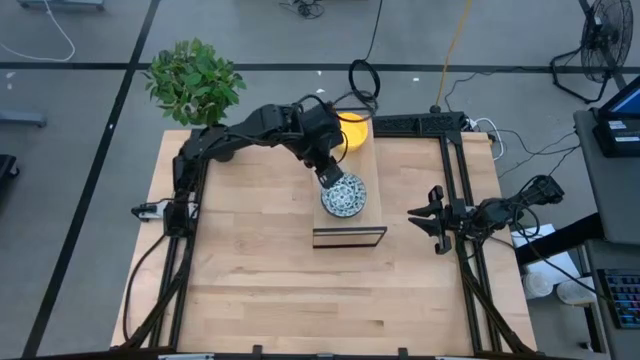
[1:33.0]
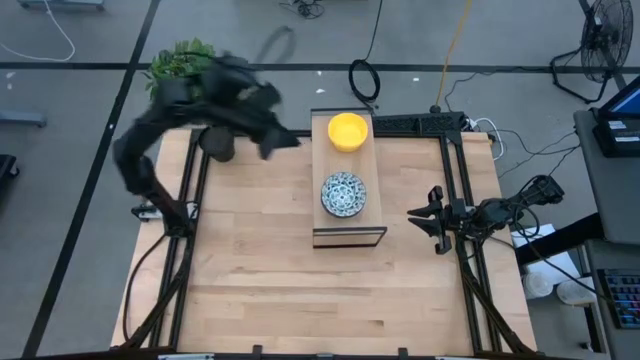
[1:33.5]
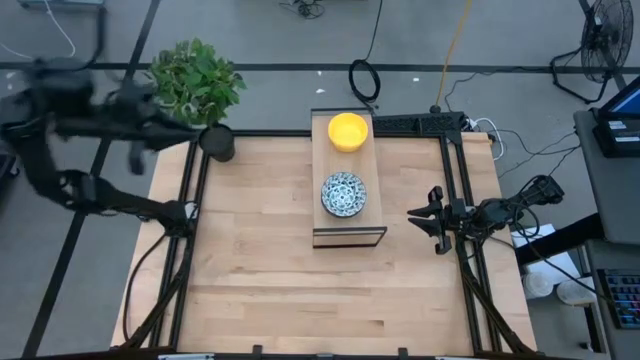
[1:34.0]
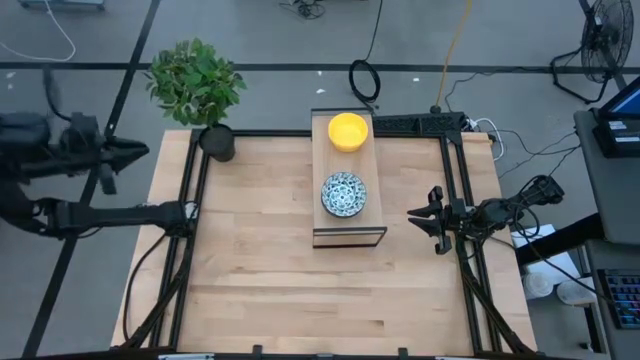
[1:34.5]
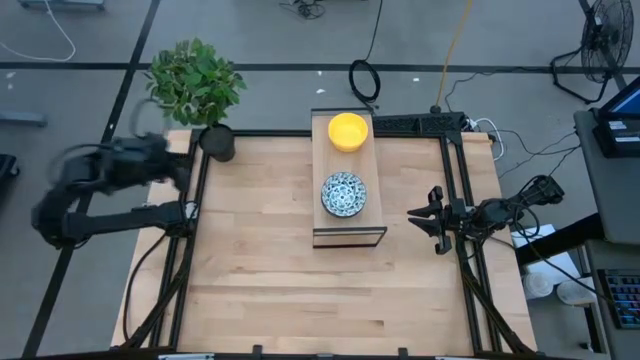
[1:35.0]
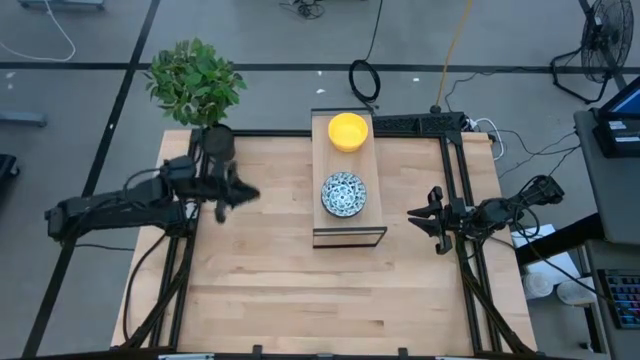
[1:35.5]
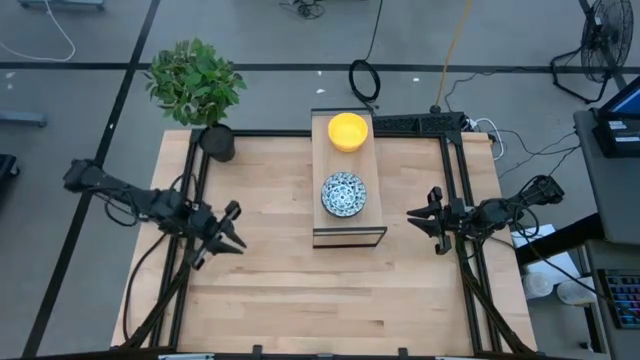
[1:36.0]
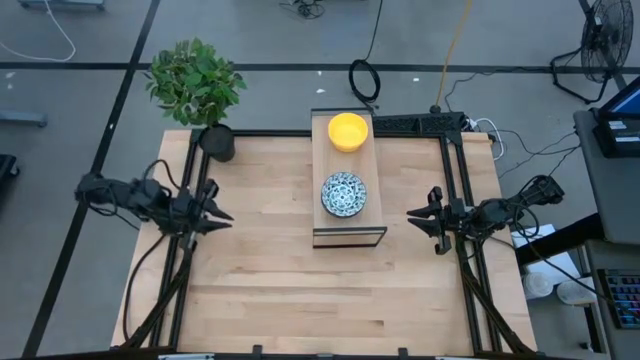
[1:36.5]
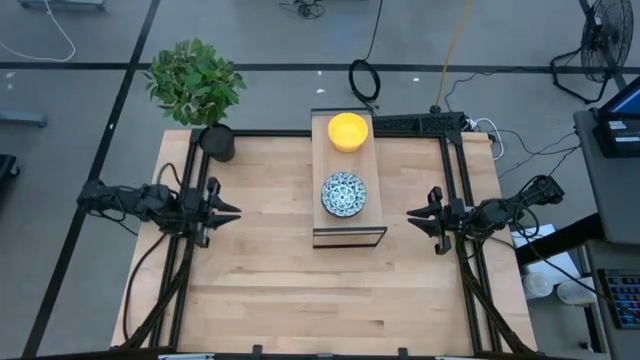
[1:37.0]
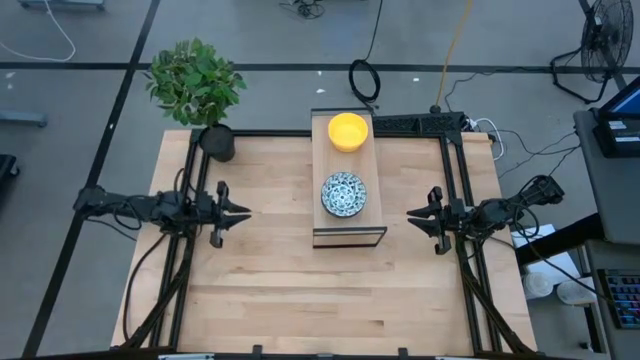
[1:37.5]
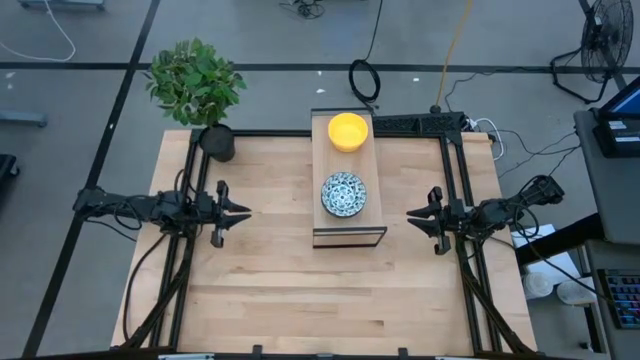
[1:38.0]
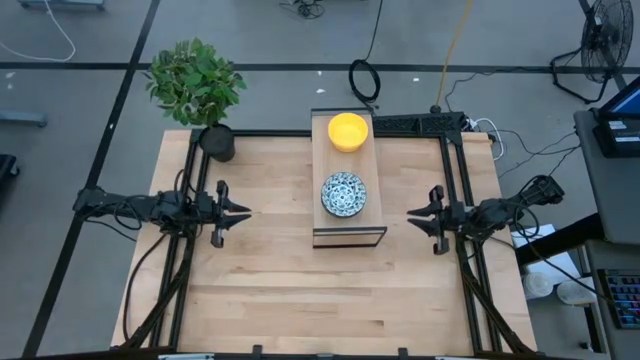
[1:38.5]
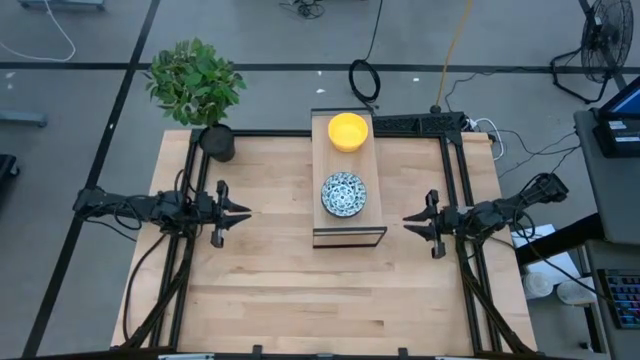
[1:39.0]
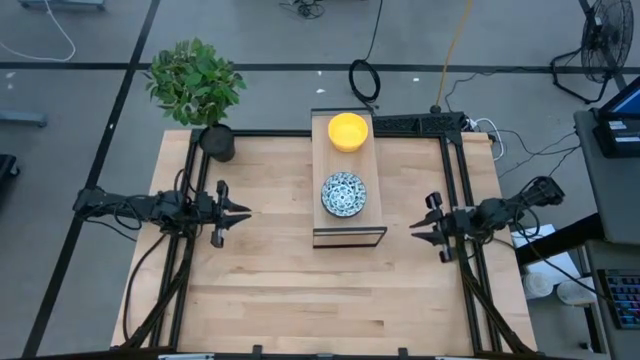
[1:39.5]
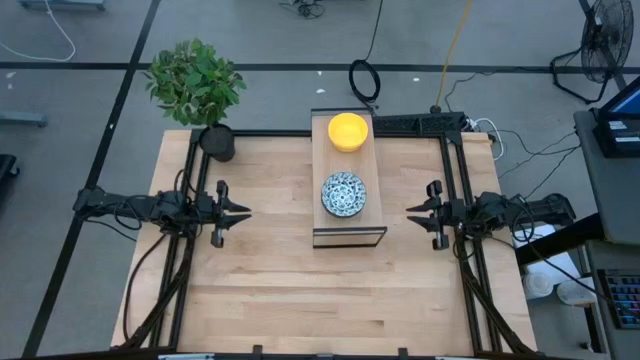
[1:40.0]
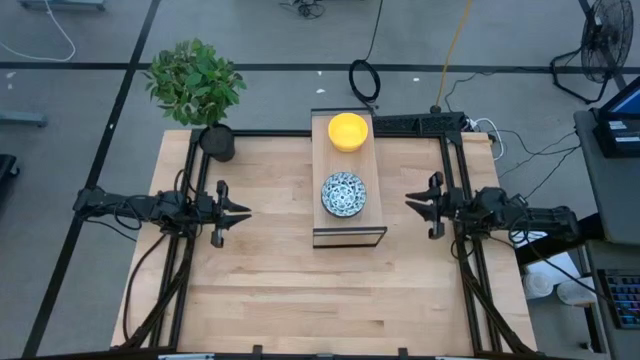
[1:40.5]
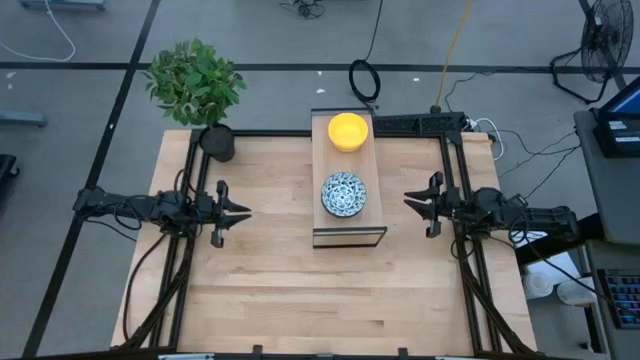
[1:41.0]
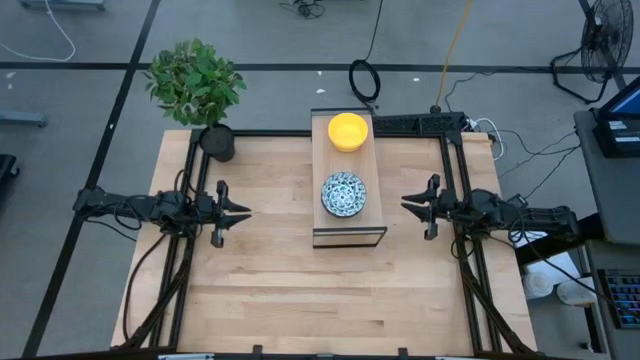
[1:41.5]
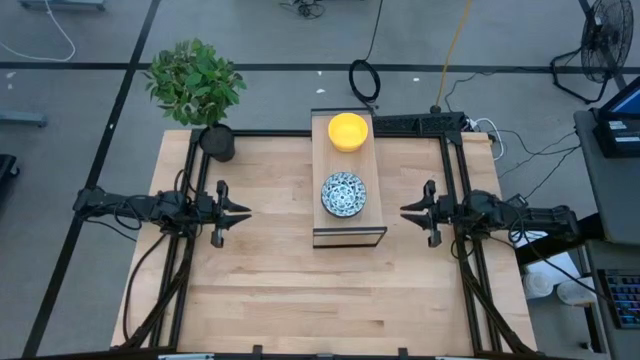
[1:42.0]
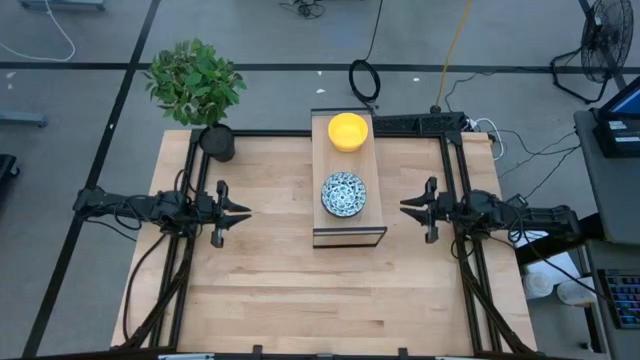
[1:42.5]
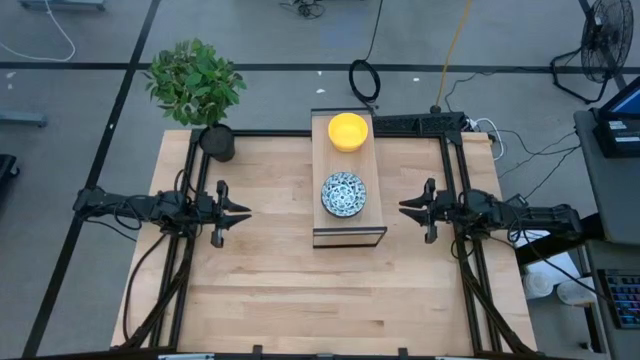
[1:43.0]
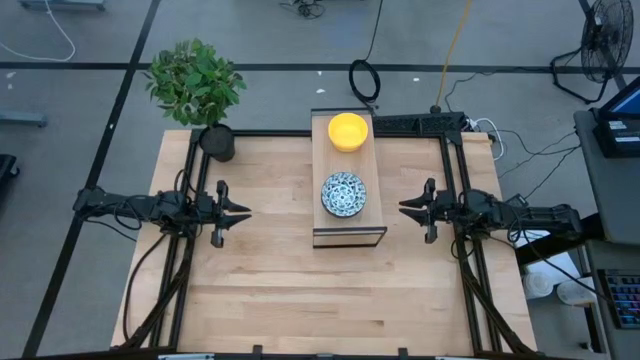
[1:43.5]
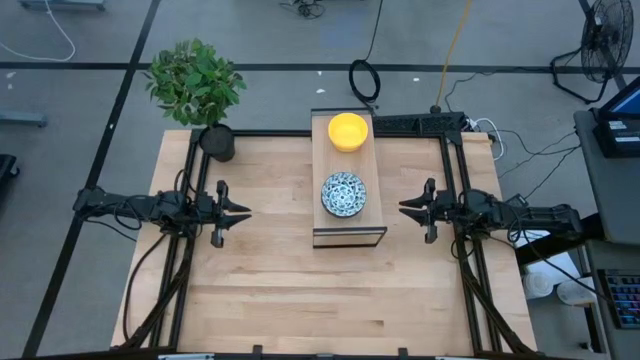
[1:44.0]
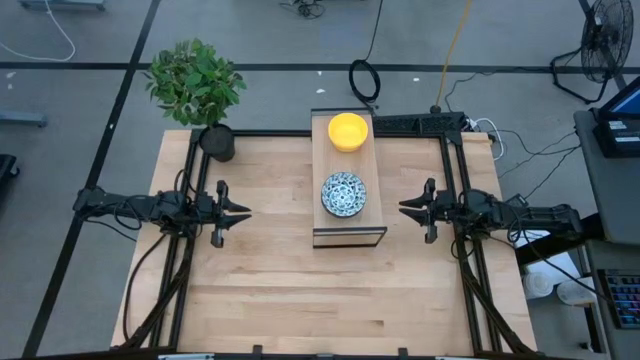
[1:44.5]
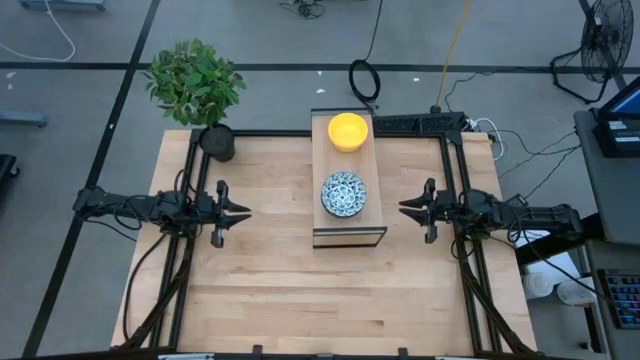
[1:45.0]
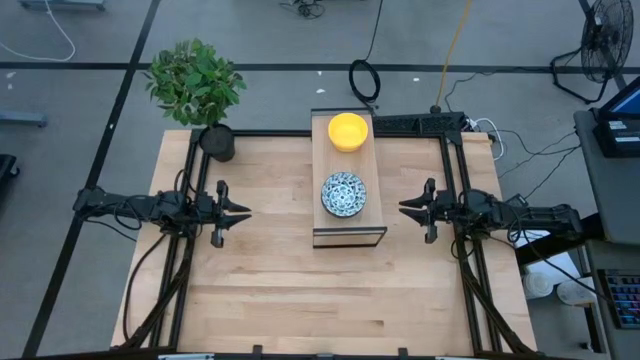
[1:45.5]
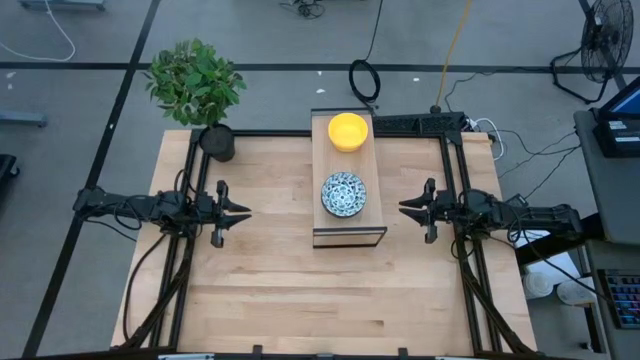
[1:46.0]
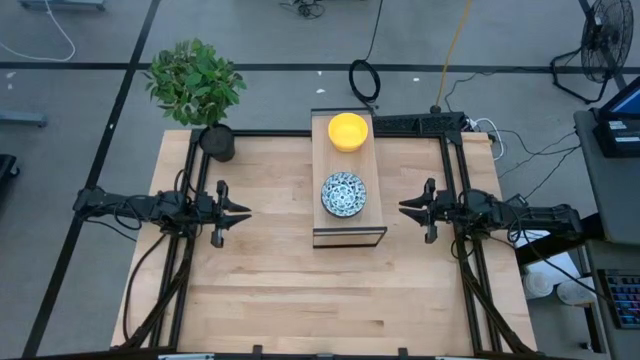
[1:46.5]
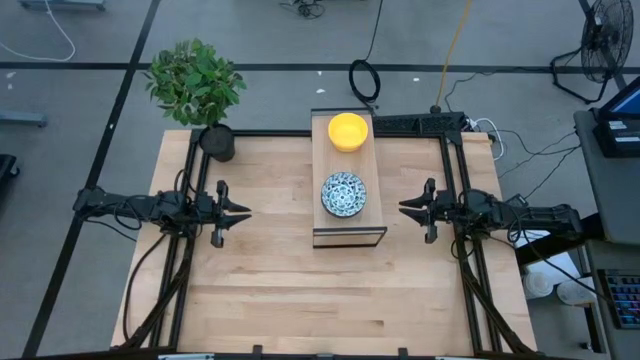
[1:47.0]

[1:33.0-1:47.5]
Task: Pick & Place Mini bowls
Return to Home Position

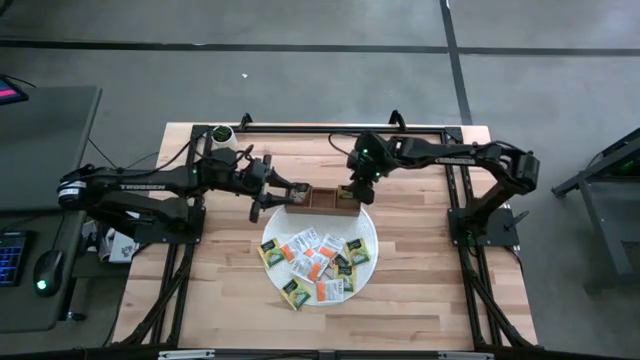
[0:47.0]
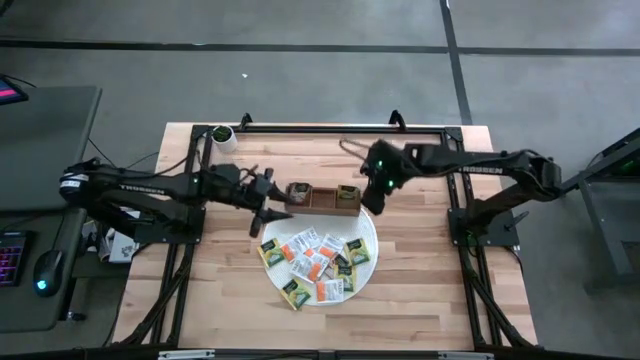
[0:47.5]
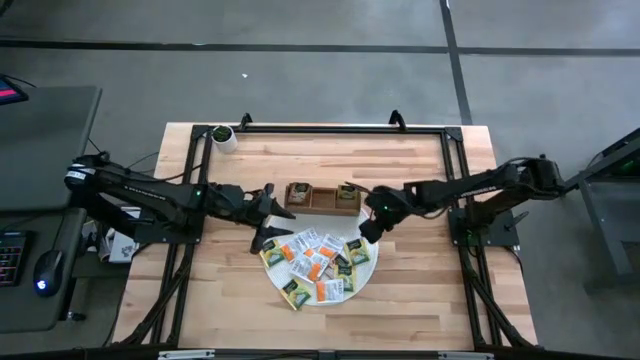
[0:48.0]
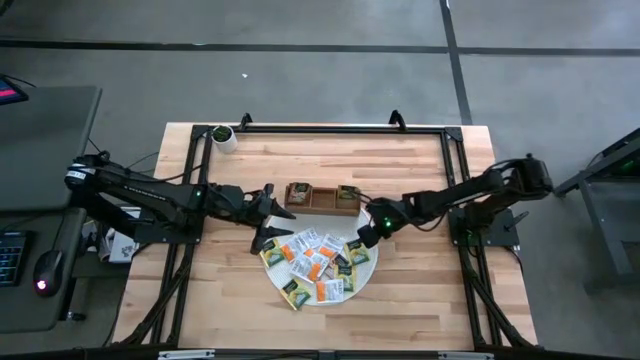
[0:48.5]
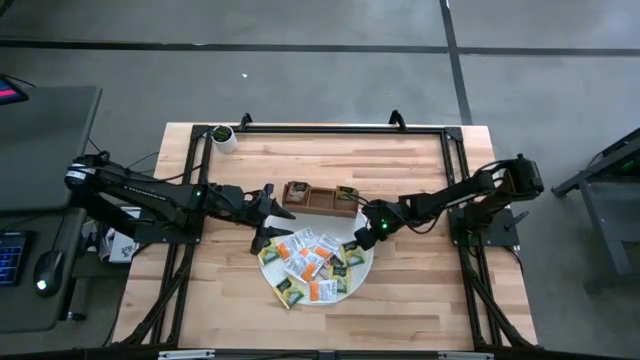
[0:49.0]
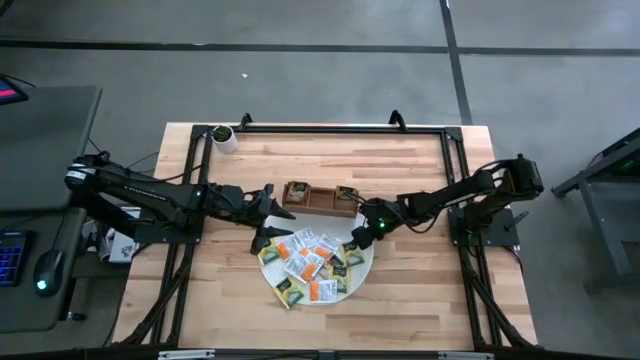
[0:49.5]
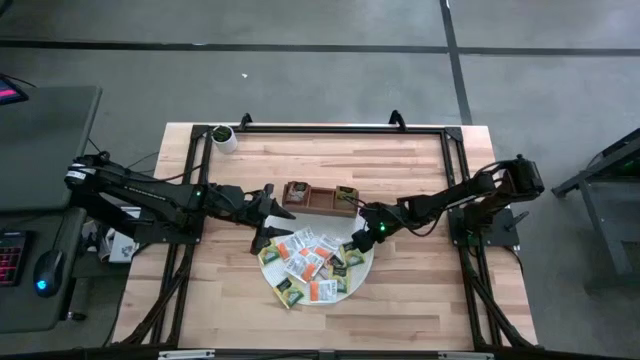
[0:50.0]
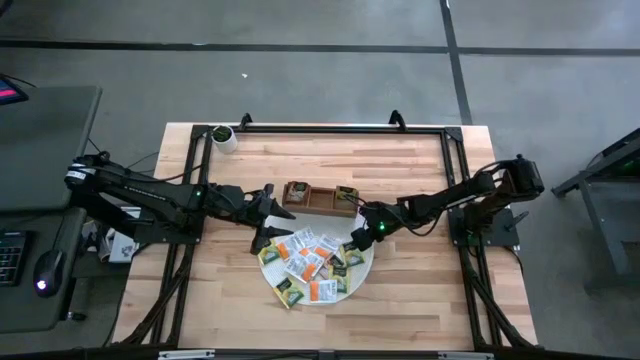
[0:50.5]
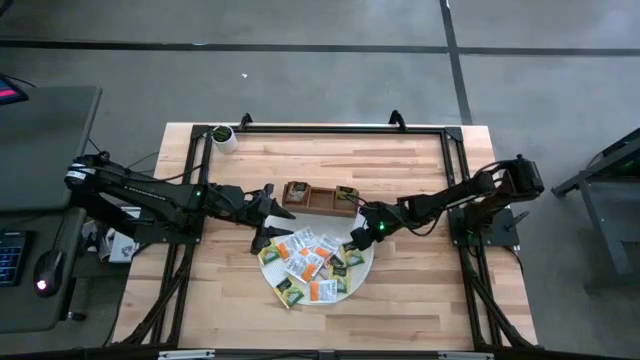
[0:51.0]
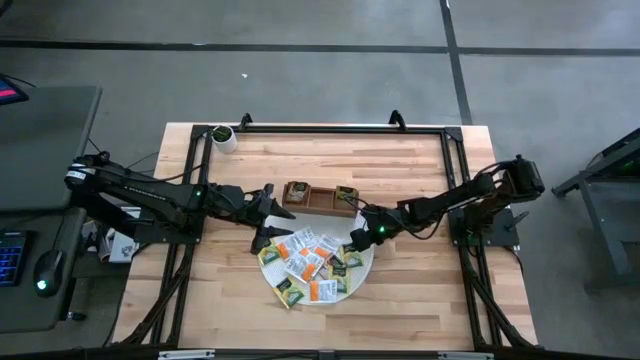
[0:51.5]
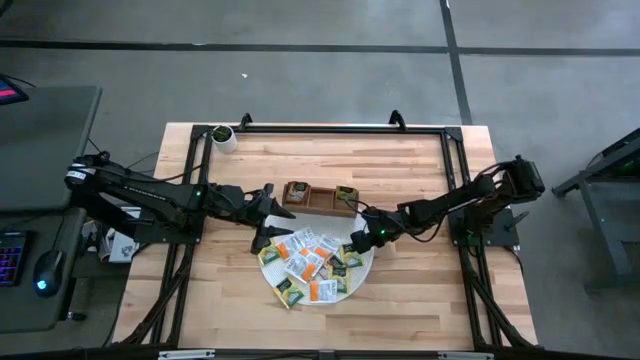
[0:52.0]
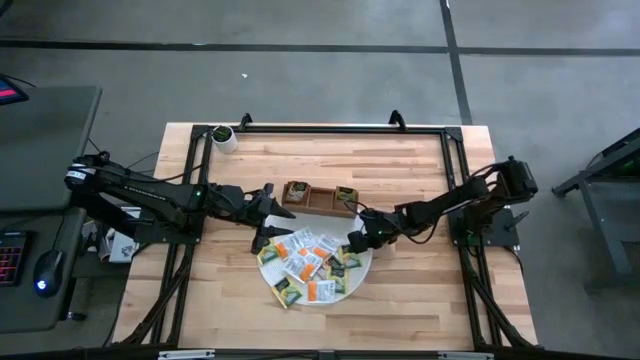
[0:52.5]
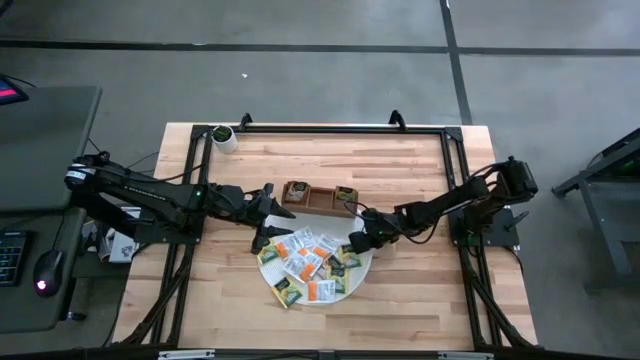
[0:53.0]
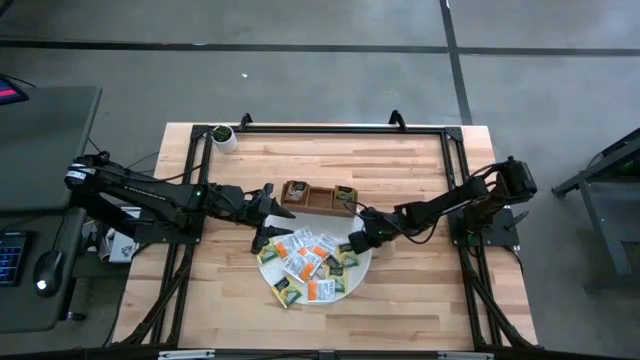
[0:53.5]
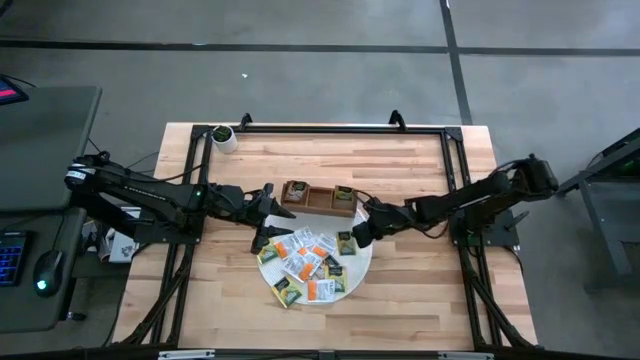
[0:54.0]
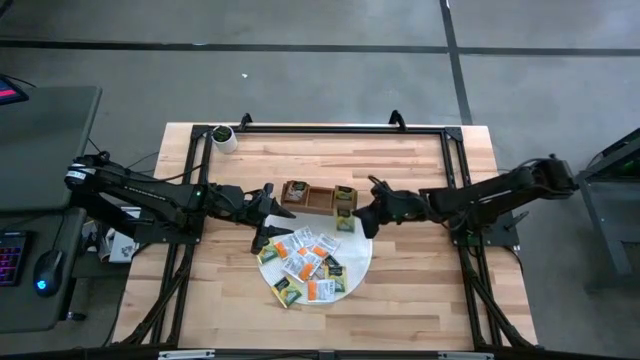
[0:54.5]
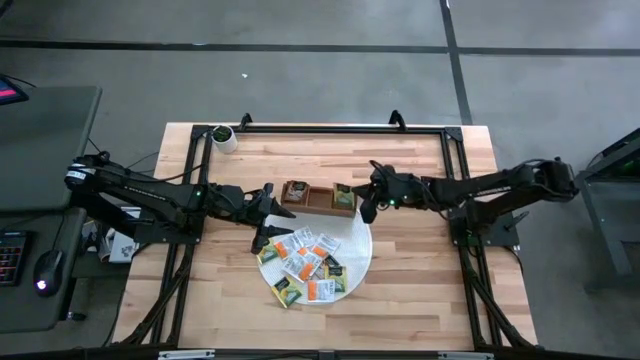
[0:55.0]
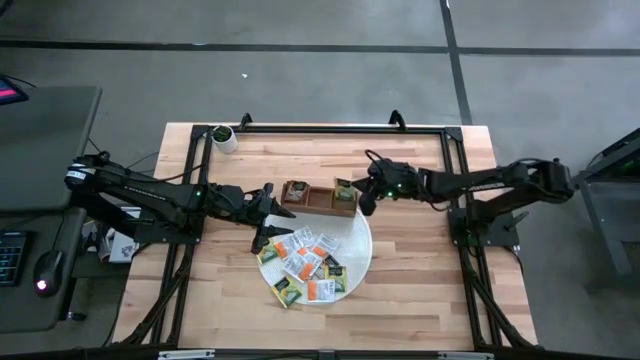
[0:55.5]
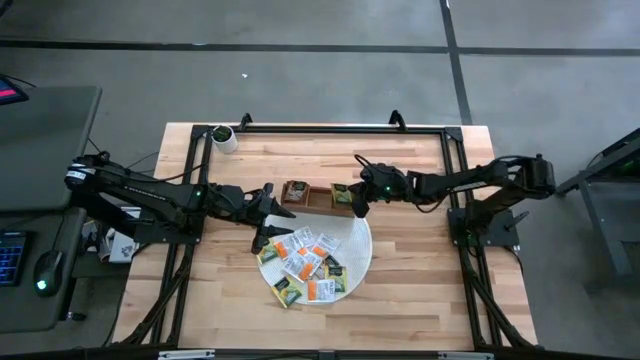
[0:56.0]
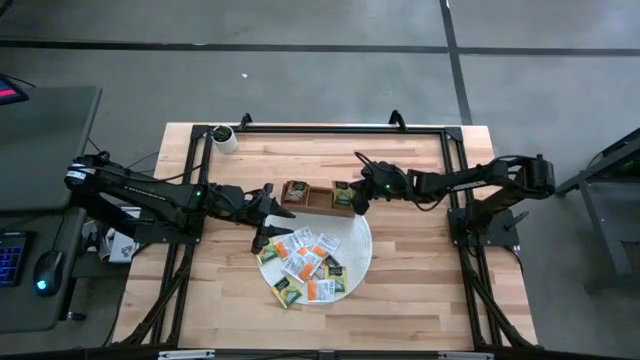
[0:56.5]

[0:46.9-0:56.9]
Task: Pick & Place Tea
Put the yellow tea bag into the right section of the wooden organizer
